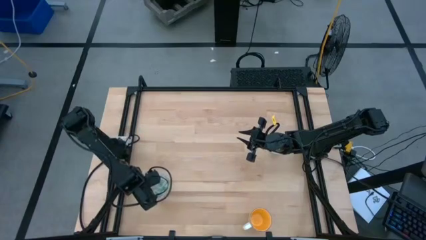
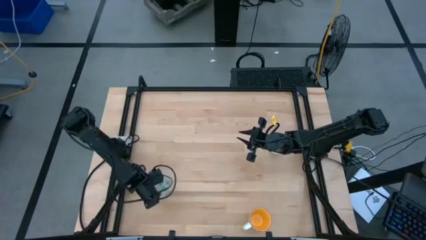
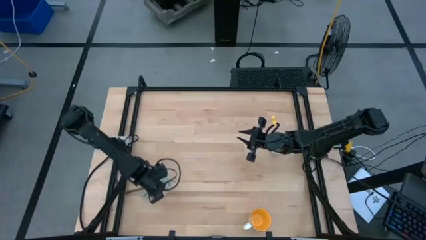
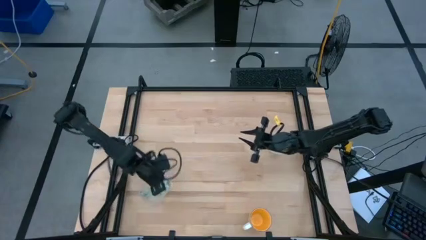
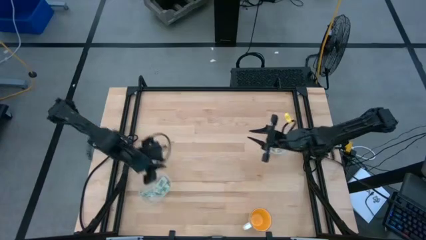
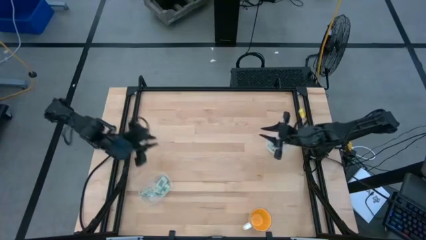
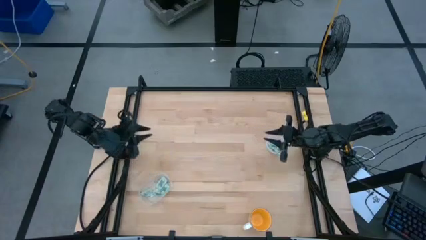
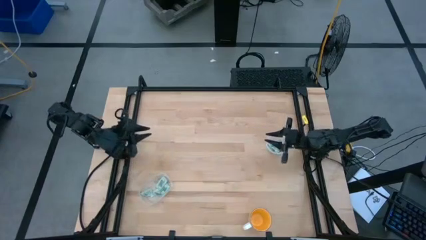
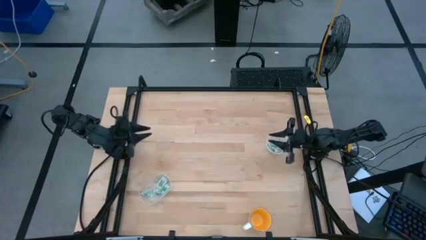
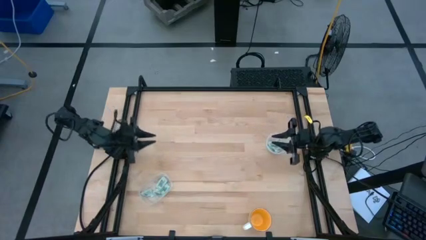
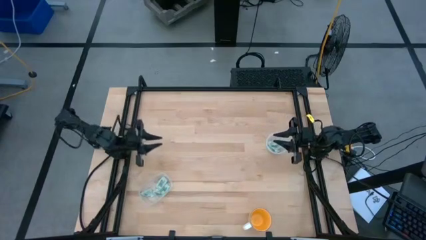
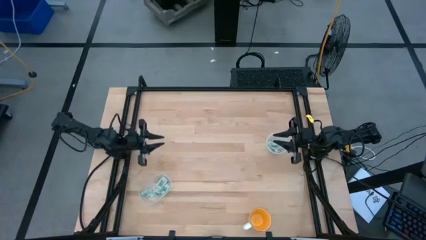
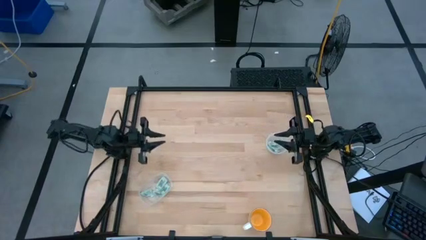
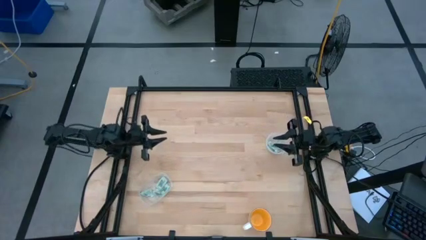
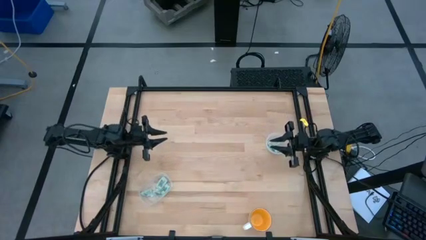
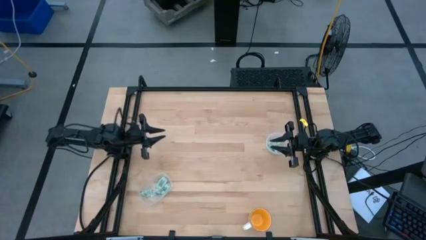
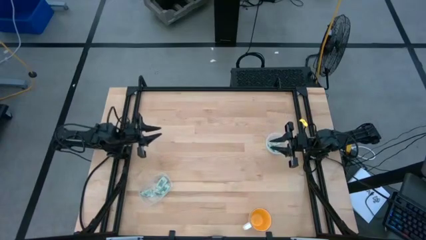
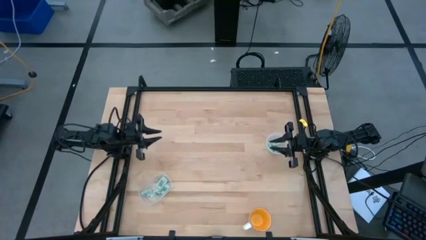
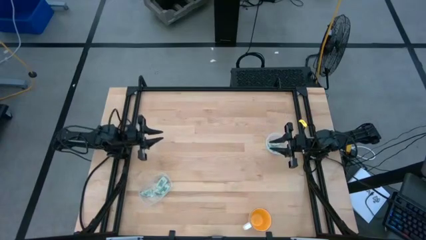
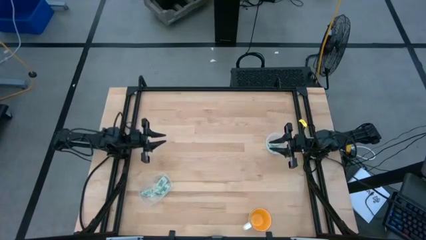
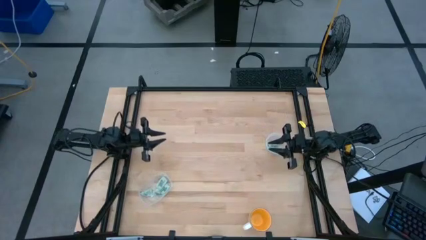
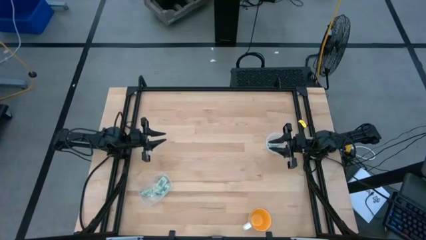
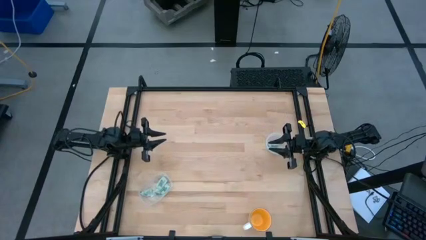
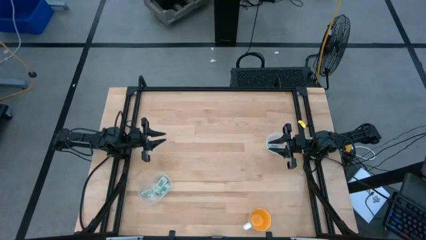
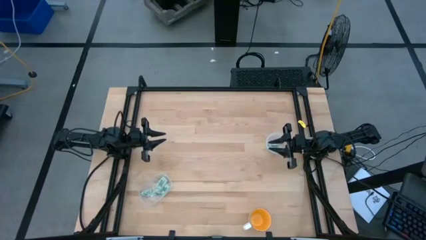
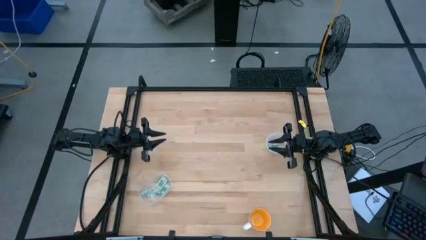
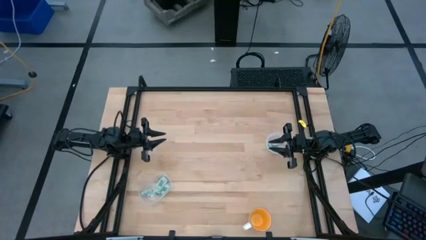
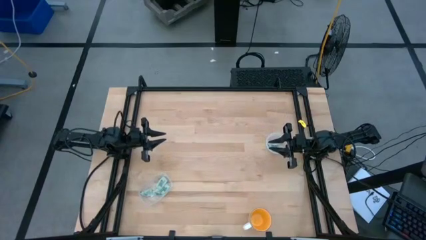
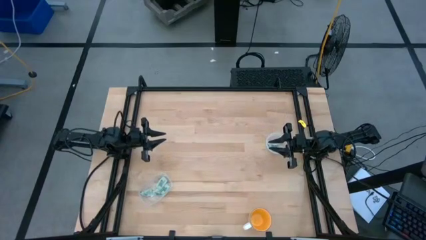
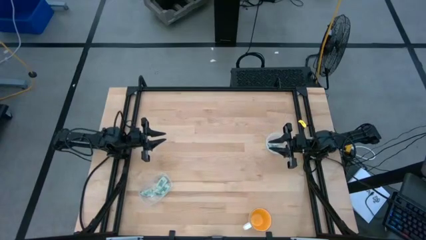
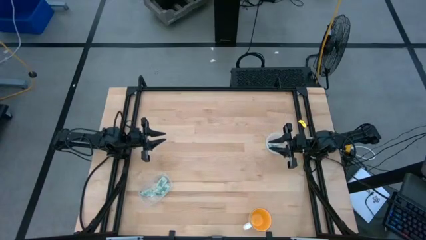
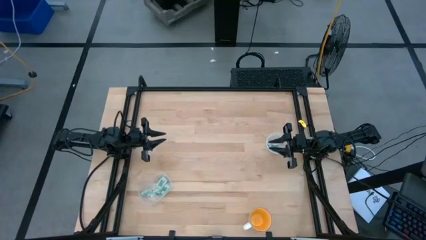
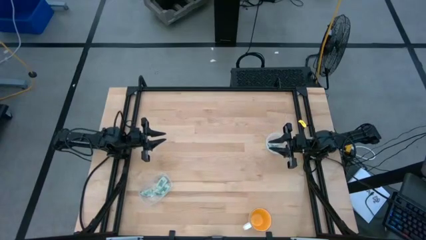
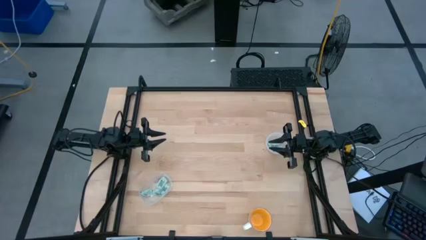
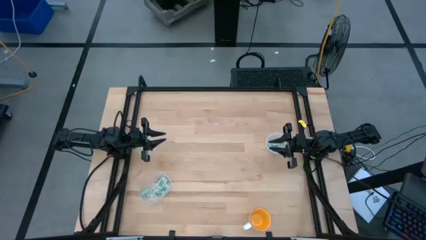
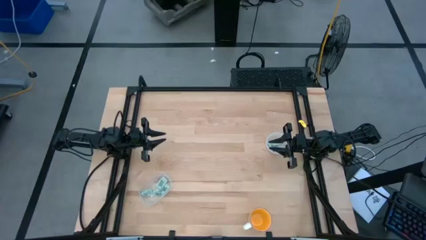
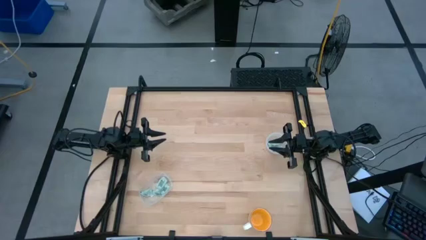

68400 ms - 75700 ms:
Task: Pick and place Stevia / Truvia into bins
Return to Home Position

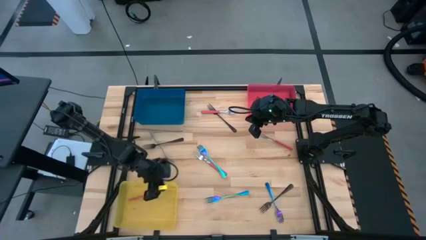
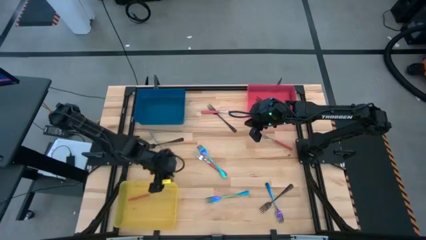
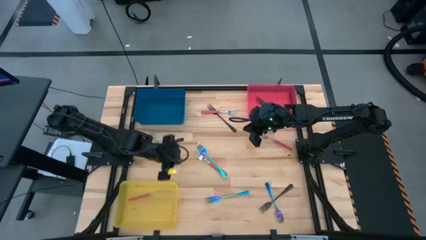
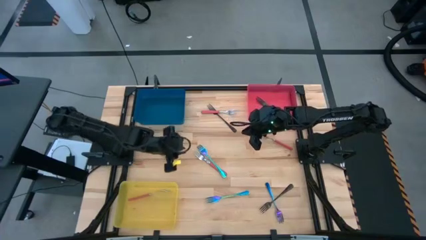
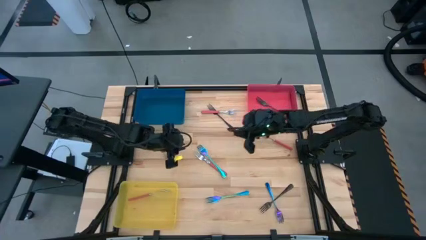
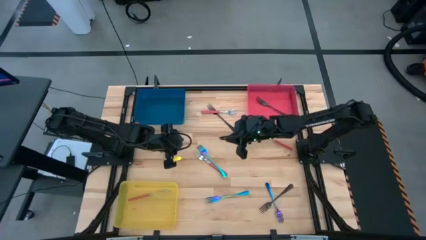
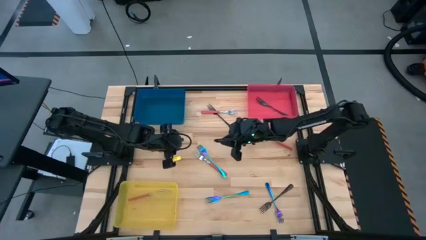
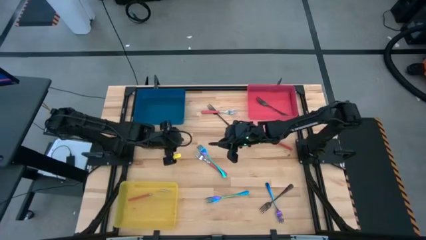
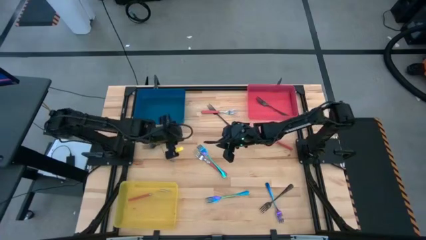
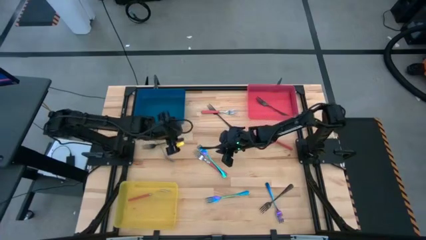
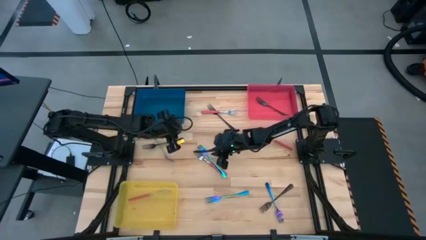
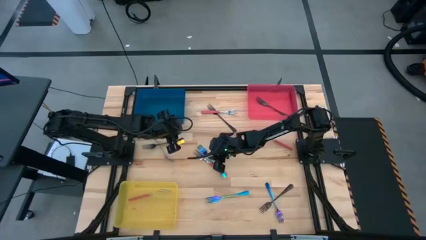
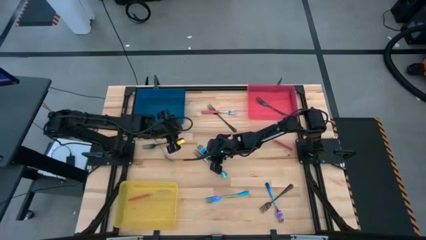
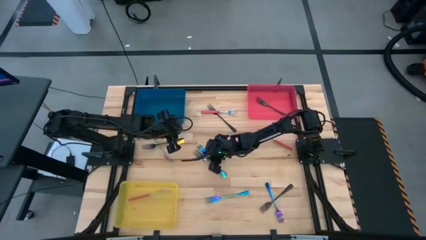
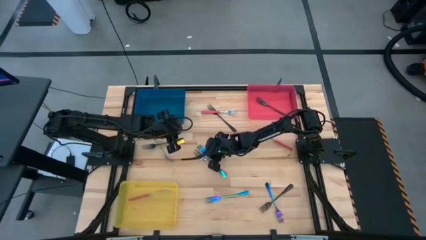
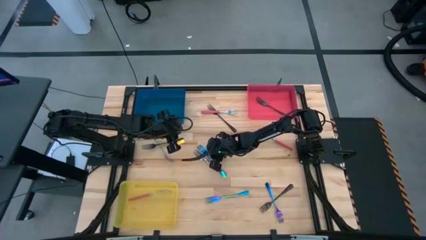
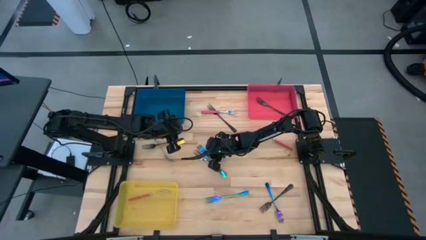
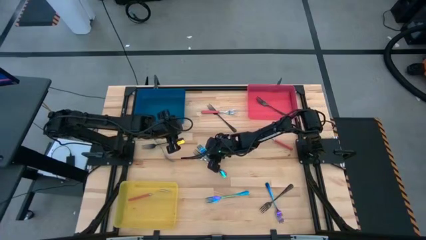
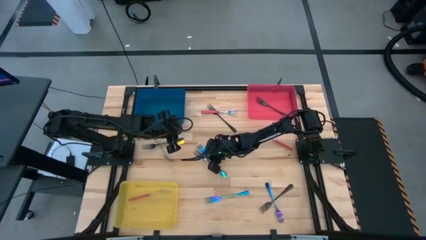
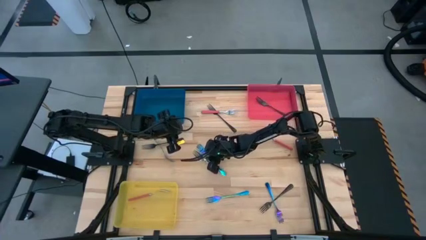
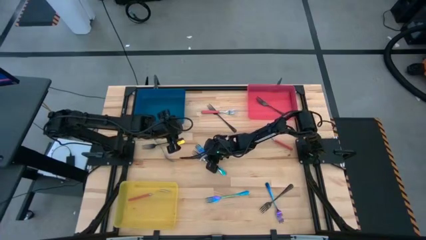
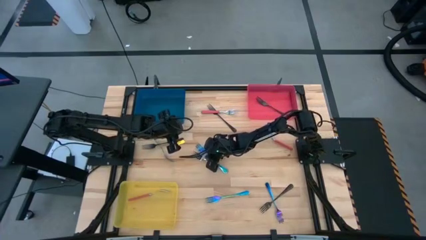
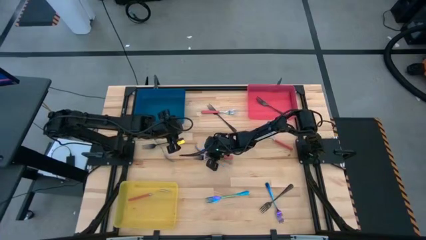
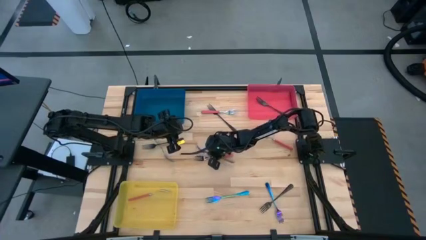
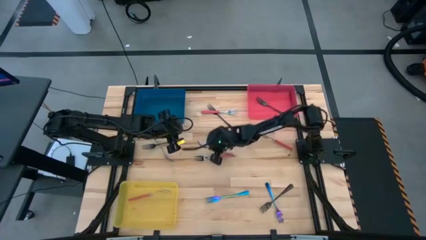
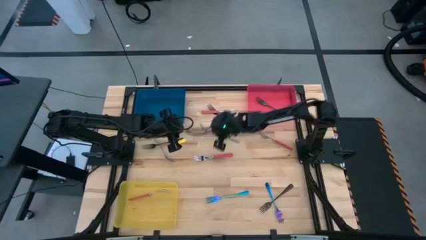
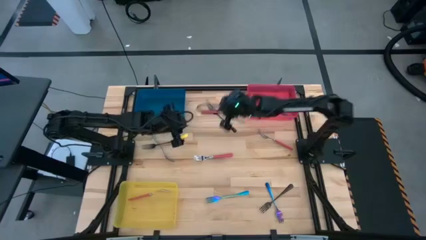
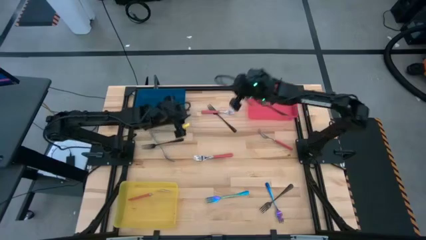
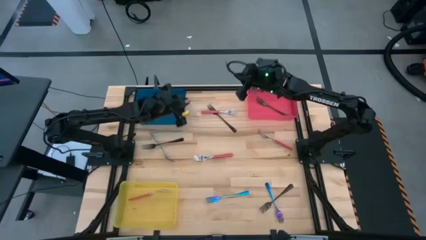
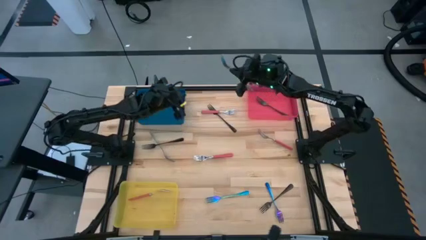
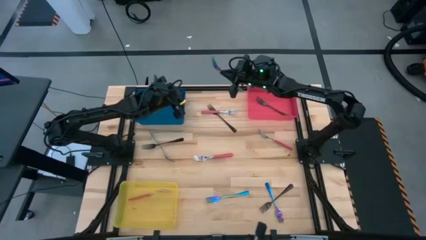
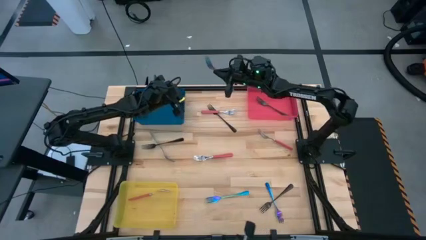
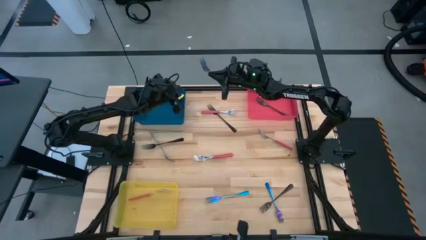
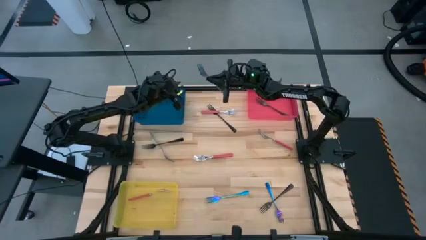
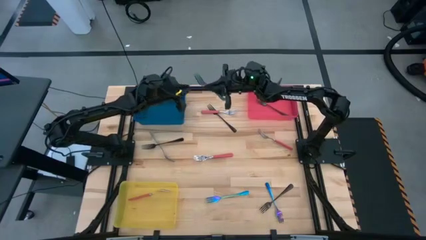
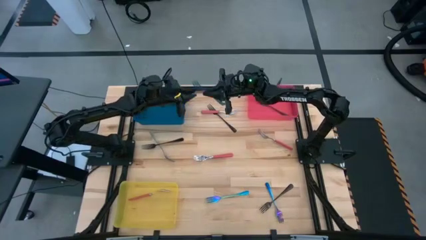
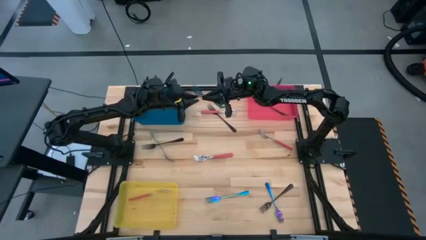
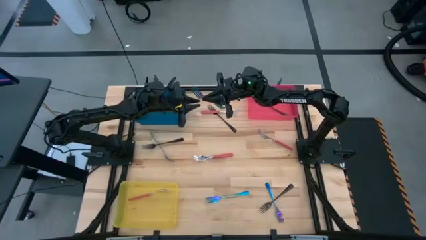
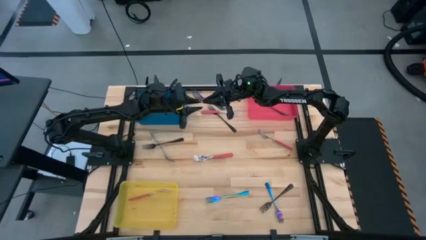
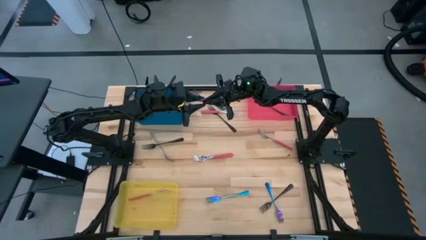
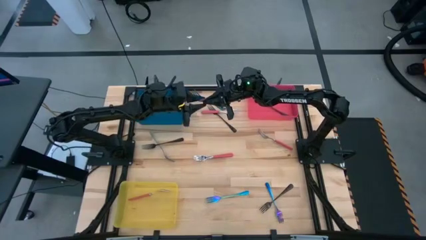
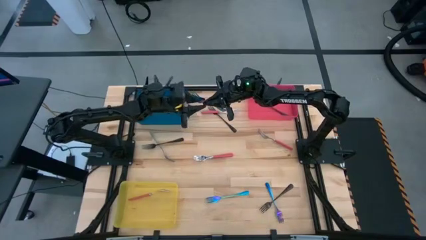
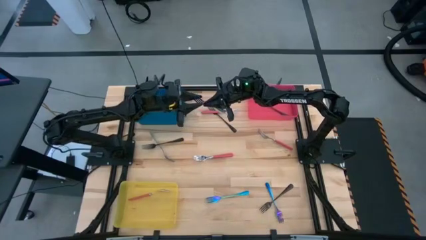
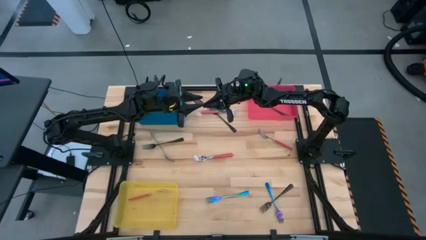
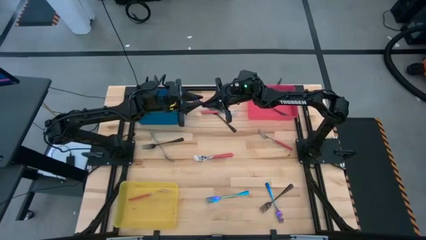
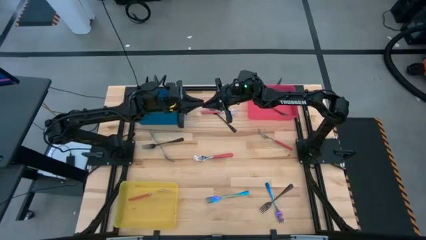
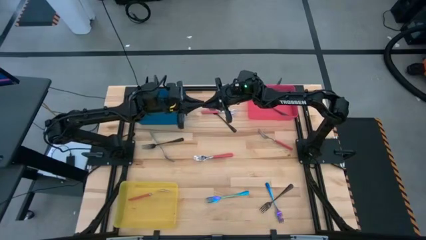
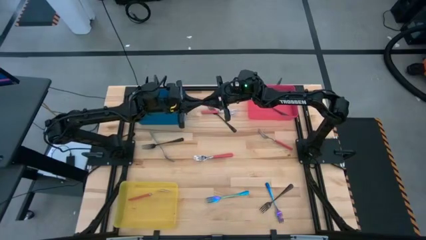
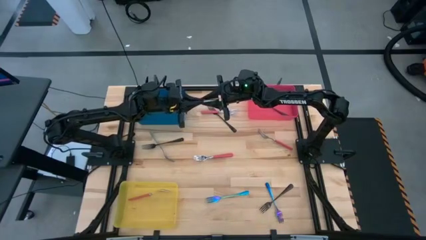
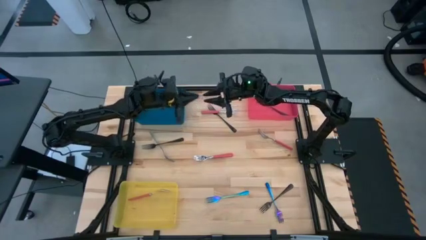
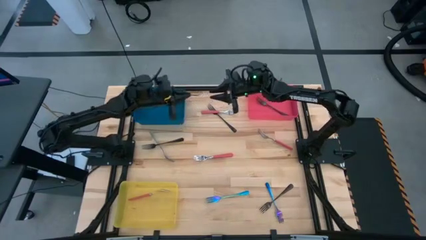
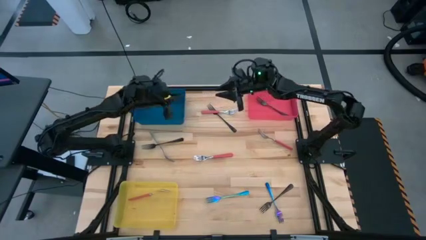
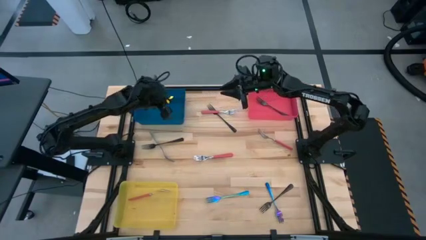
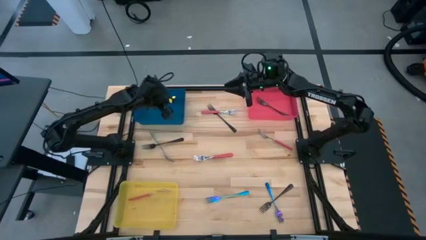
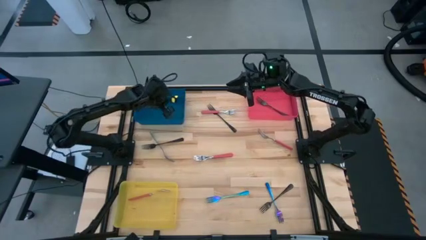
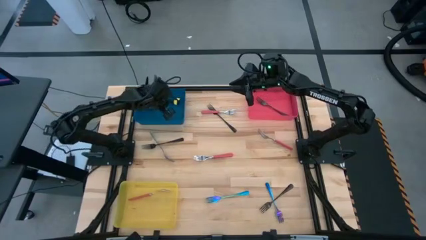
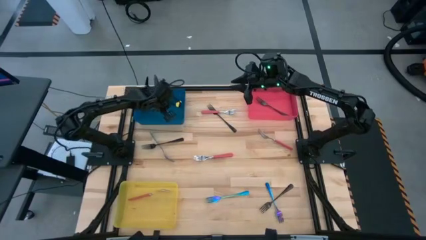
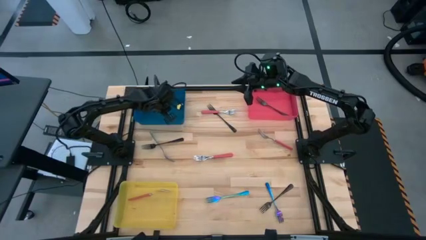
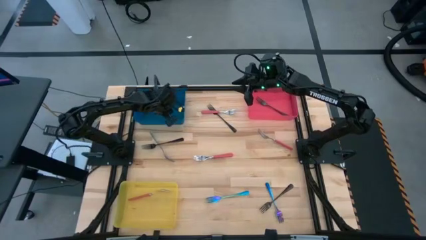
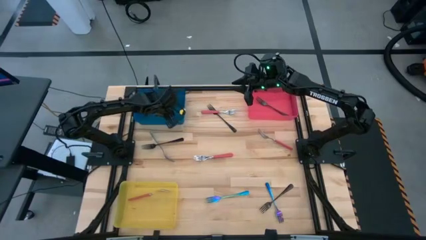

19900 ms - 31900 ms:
Task: Sort silverware by color (type)
Put the top iridescent fork into the blue bin
